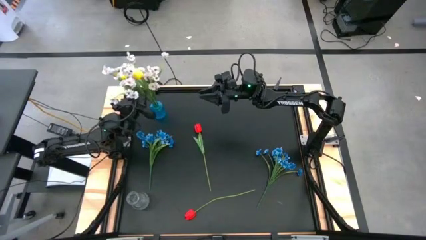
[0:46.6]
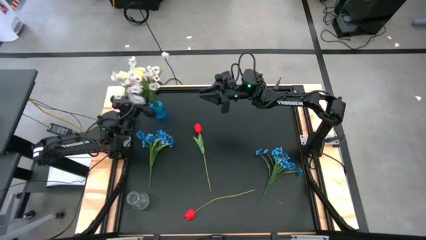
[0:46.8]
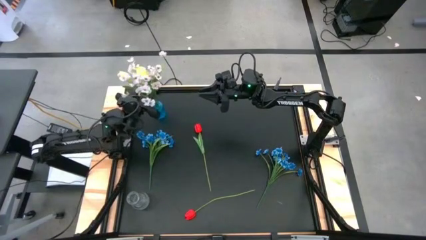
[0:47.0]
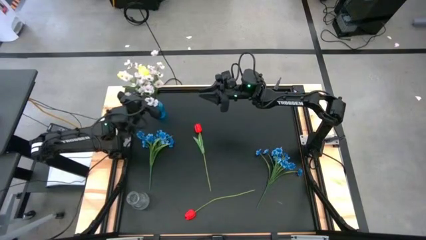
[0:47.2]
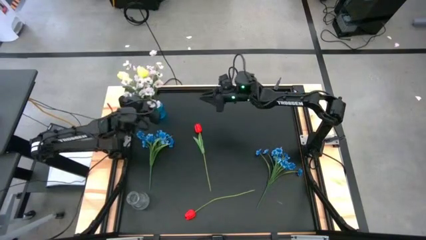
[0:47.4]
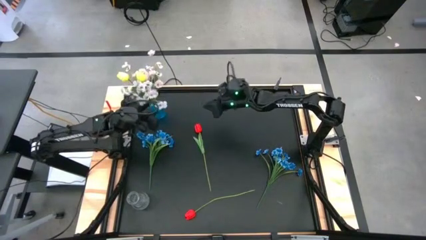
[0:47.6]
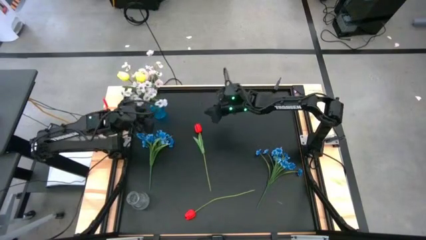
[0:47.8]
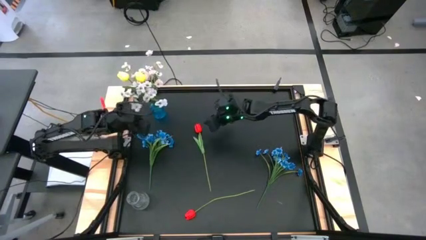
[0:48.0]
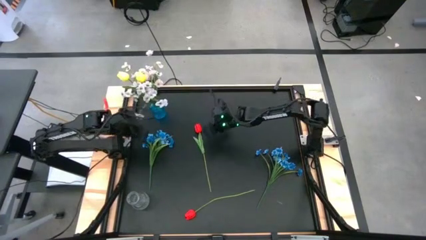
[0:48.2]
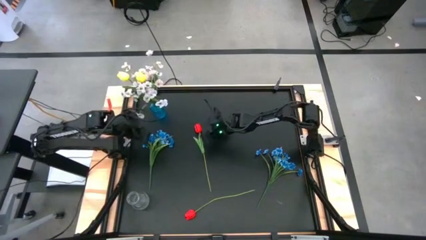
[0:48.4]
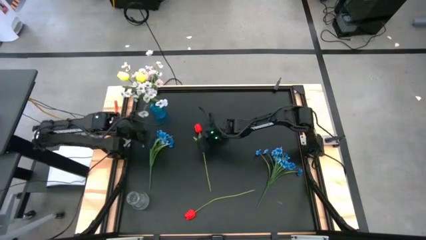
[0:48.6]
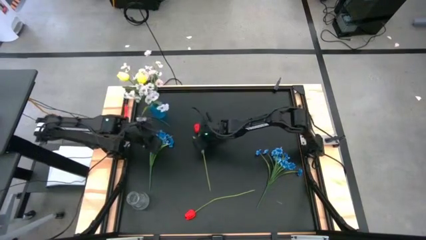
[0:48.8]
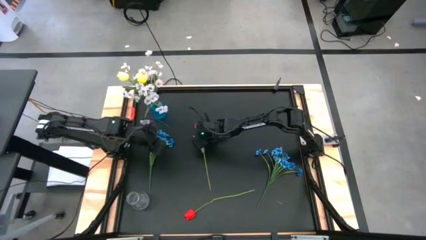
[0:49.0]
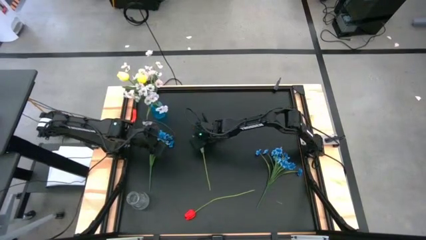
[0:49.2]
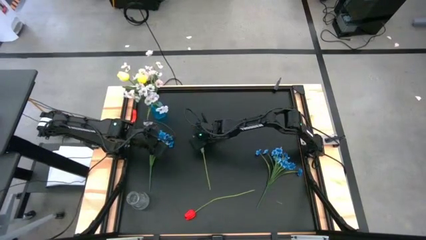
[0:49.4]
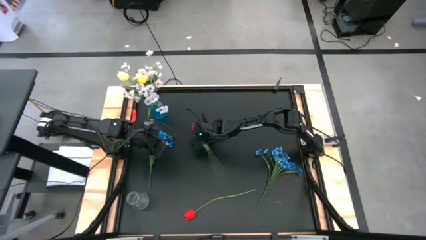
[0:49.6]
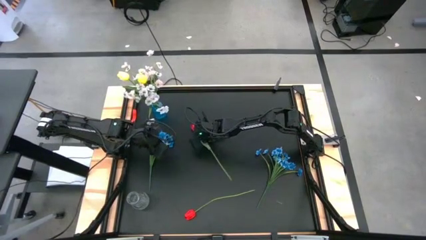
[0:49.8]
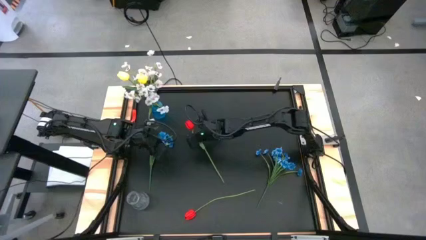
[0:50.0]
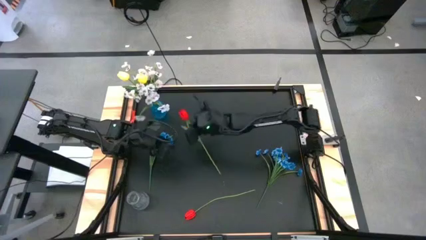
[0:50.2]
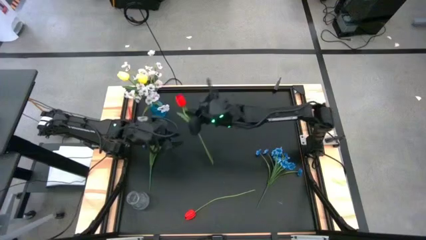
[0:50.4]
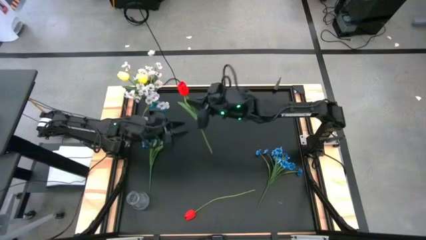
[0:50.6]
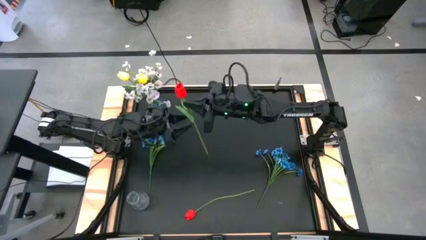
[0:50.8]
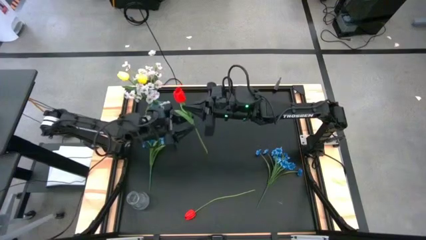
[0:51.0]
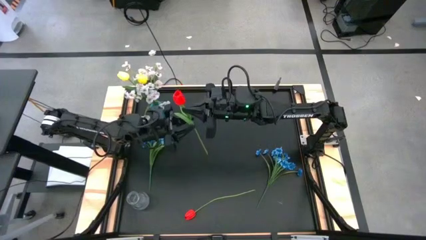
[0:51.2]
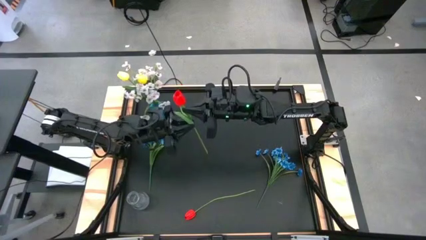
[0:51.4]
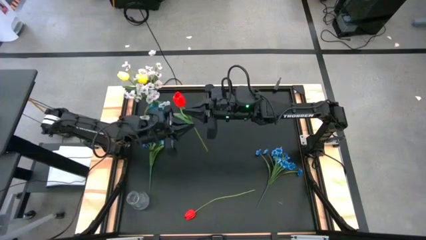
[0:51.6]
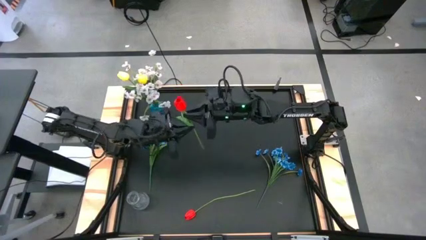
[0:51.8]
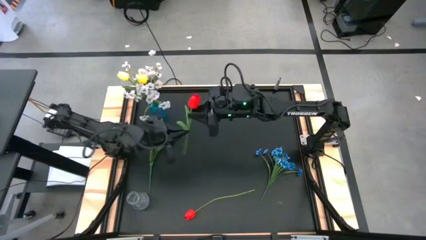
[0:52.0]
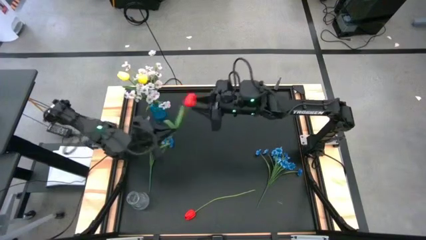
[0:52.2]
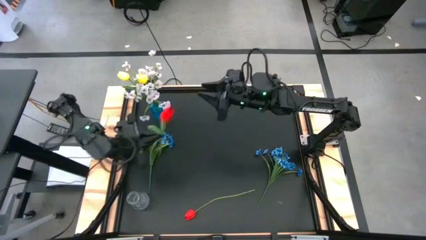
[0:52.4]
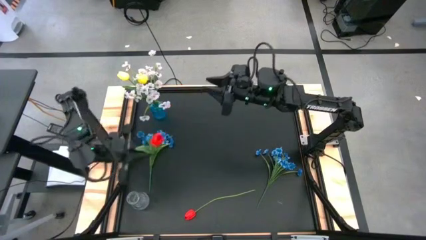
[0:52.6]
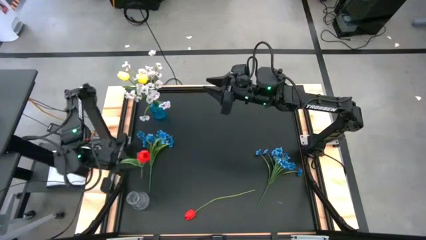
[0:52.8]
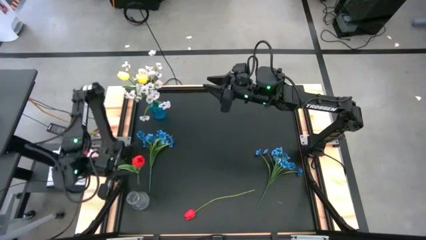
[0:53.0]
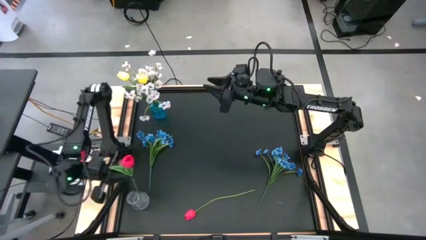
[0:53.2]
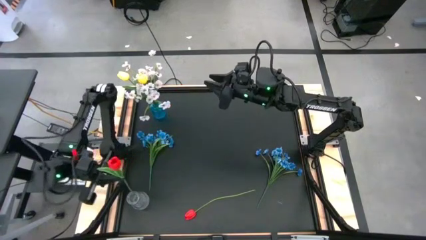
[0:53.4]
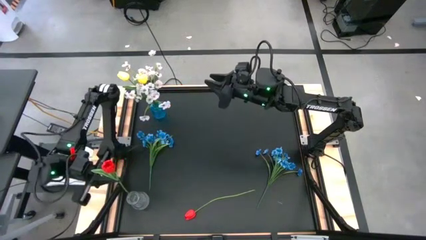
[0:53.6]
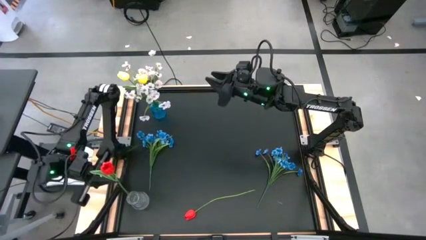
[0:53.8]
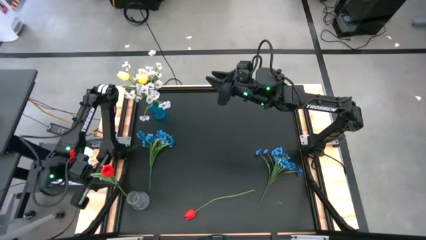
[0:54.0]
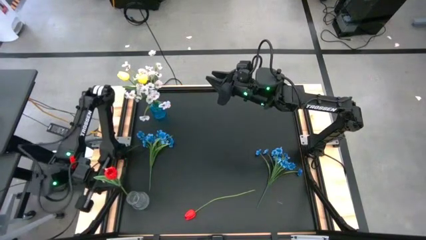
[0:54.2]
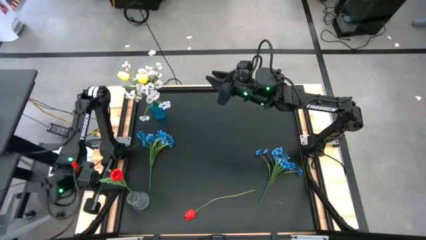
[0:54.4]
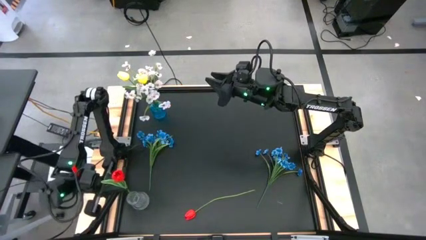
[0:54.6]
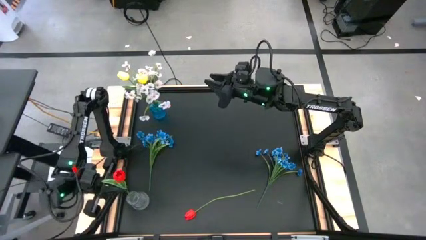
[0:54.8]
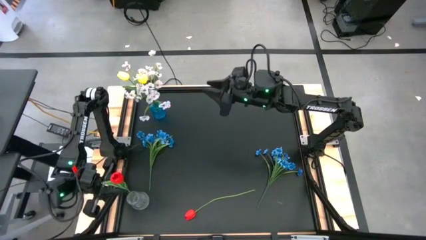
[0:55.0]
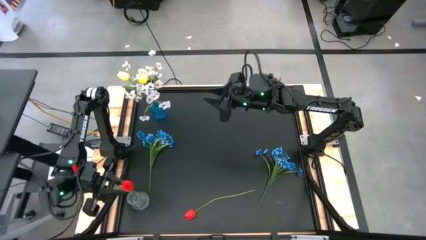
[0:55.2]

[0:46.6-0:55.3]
Task: Sort flowers into vase by color
Put the top red flower into the transparent vase

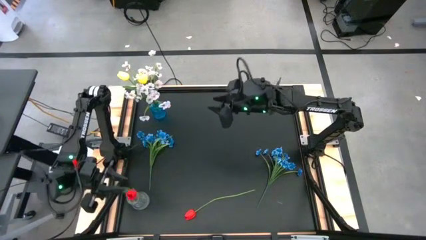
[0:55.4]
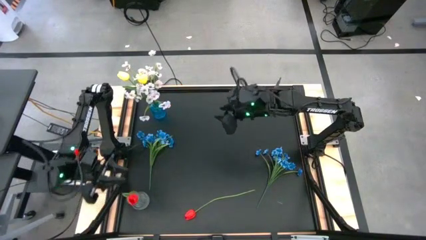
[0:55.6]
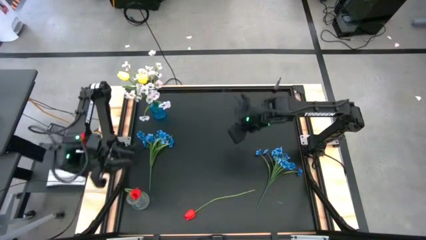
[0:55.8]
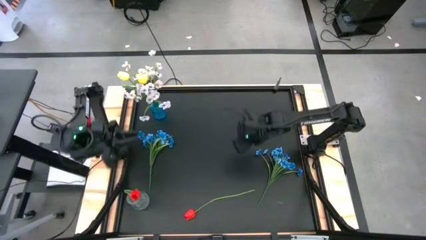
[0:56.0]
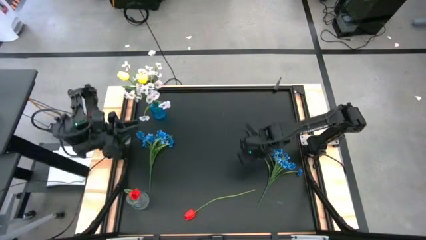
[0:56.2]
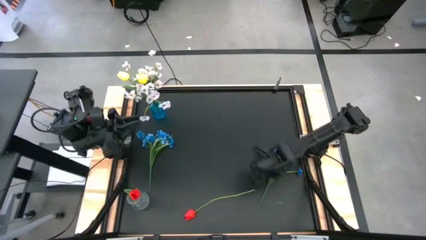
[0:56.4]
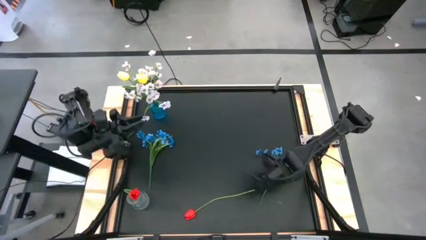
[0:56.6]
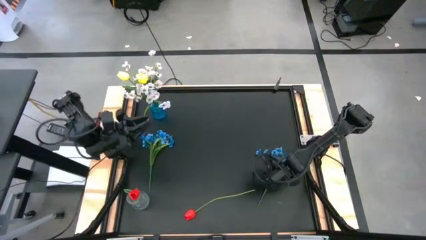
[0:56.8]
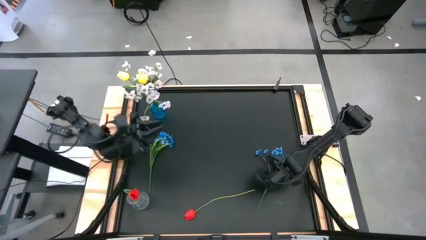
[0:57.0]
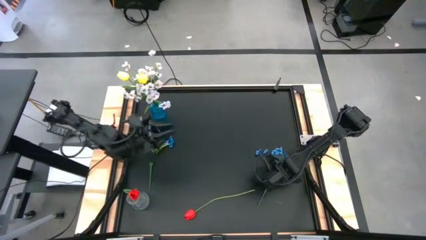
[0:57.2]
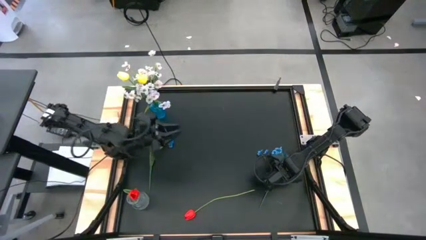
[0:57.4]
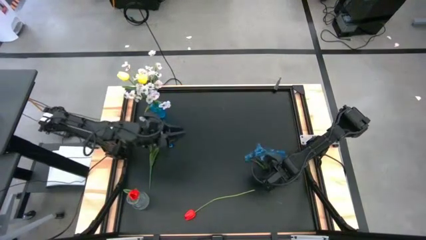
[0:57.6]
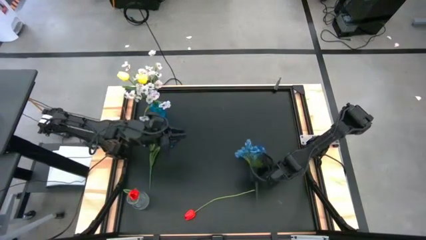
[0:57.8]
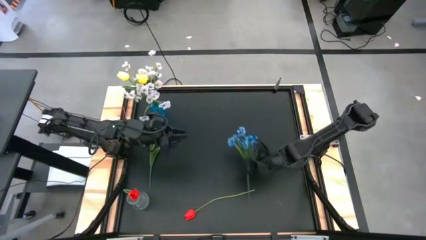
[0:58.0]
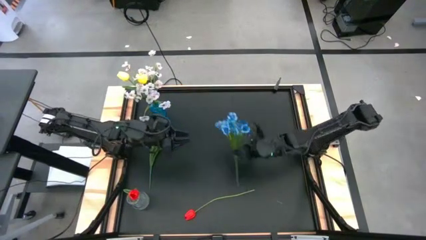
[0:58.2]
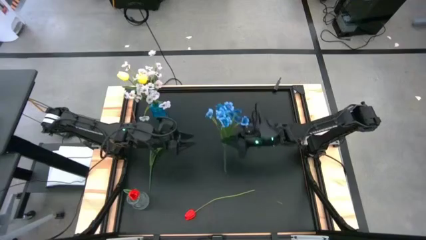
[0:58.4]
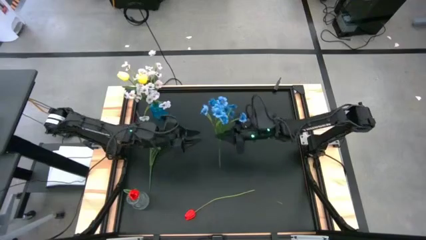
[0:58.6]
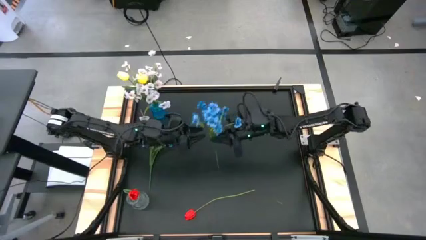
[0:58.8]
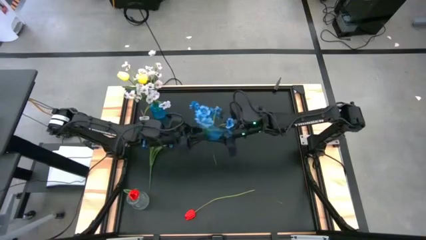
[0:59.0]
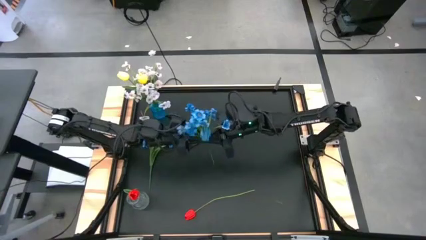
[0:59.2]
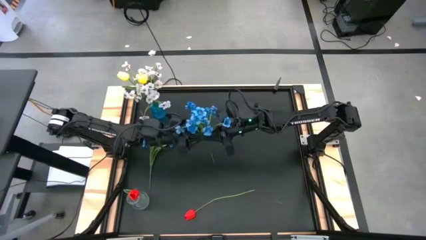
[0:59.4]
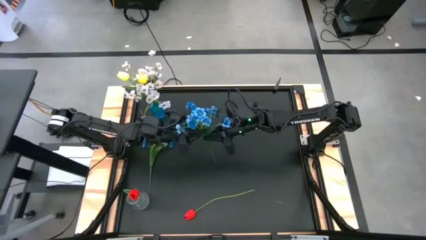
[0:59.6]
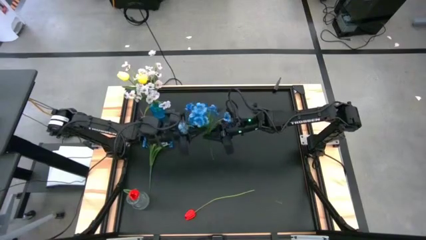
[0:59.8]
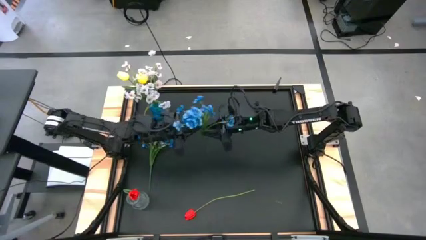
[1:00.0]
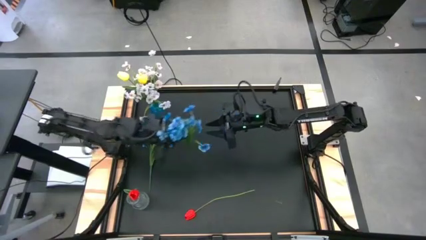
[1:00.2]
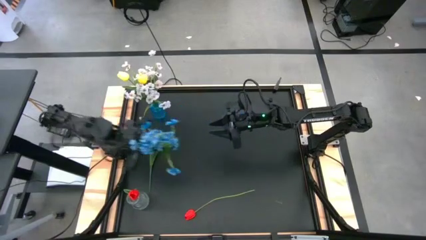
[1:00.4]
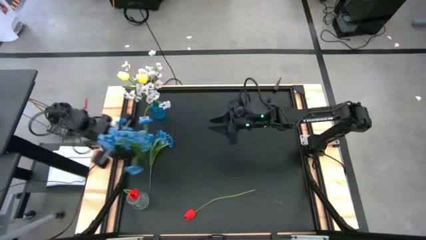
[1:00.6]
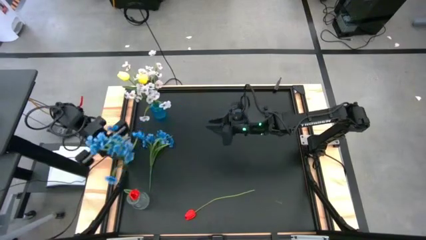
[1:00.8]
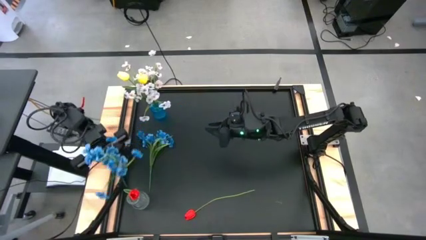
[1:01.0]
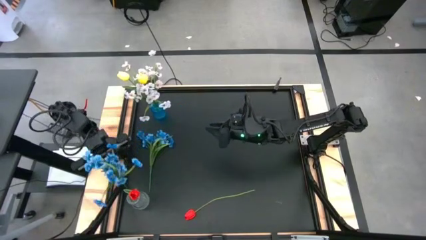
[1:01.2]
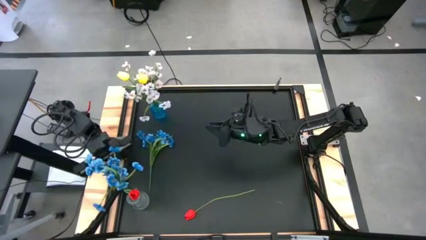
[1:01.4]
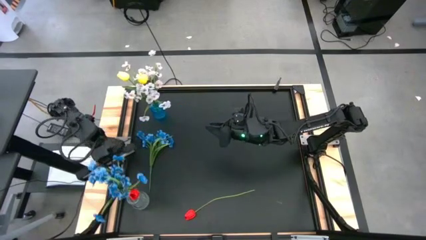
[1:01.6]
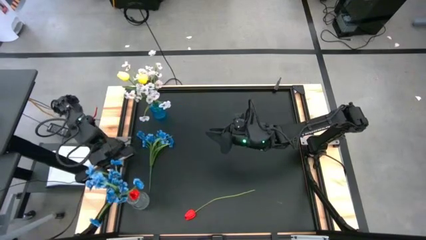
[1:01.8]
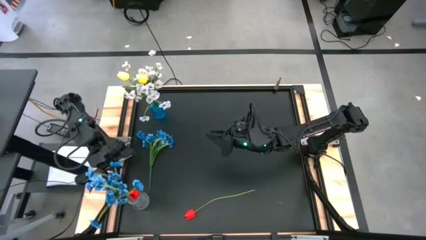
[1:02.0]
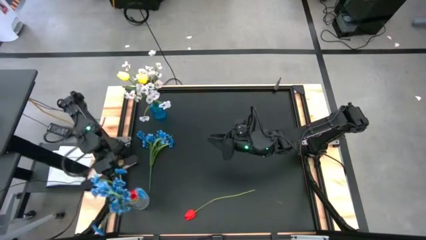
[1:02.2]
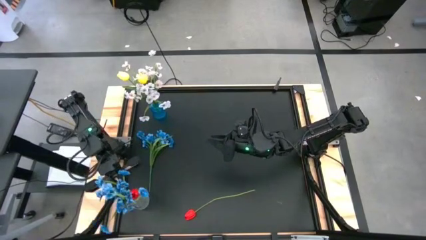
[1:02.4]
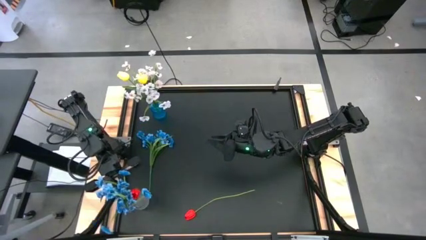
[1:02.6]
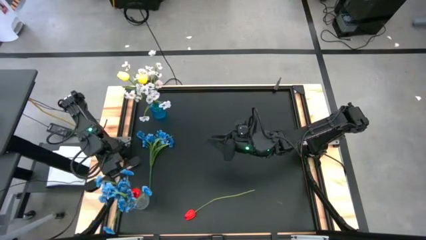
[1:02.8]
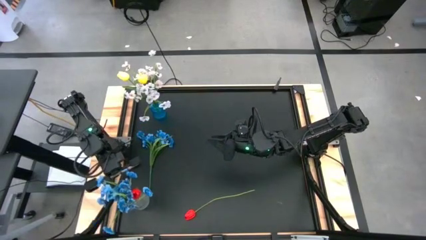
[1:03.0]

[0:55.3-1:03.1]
Put the right blue flowers into the transparent vase
